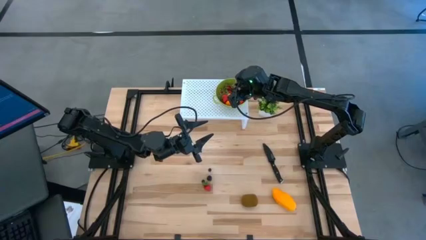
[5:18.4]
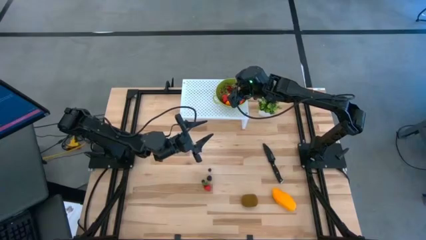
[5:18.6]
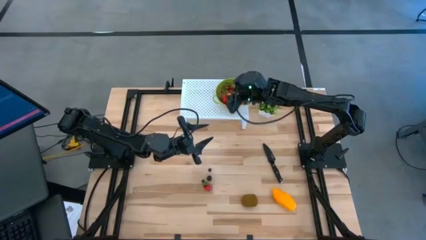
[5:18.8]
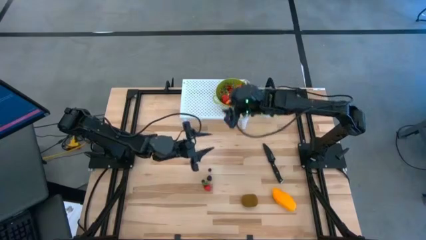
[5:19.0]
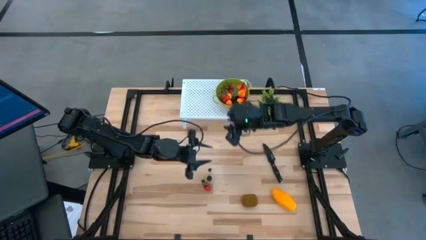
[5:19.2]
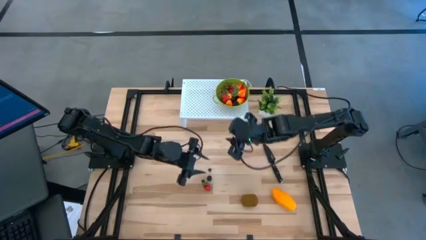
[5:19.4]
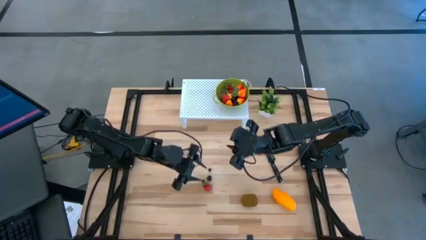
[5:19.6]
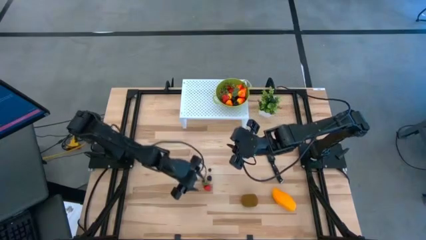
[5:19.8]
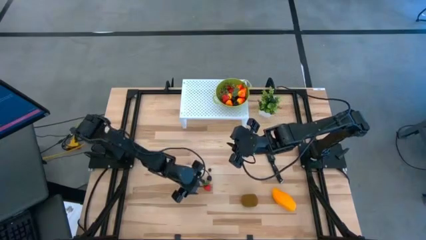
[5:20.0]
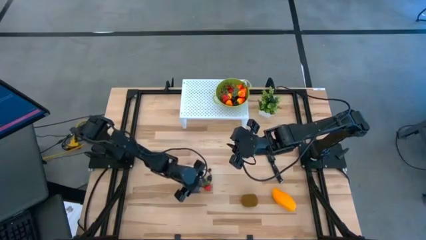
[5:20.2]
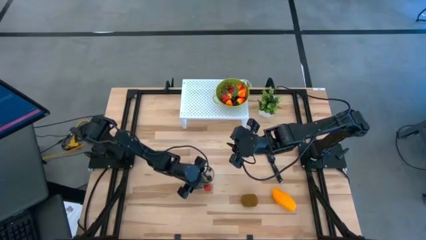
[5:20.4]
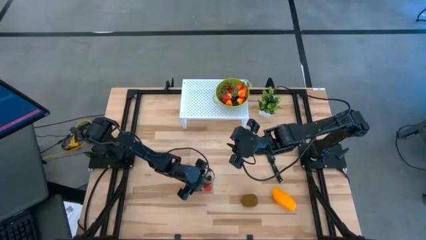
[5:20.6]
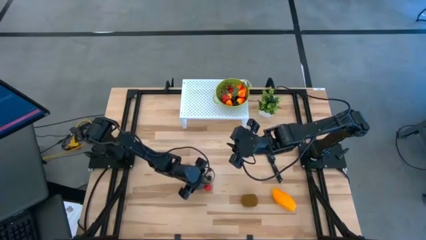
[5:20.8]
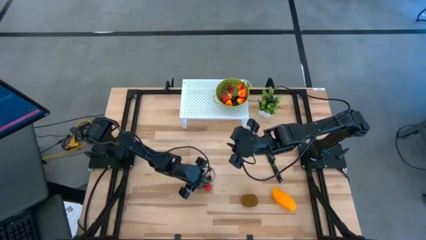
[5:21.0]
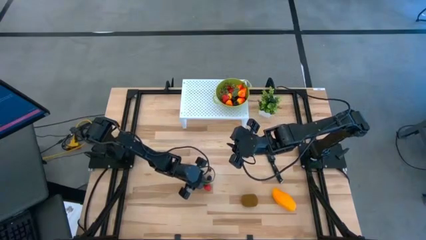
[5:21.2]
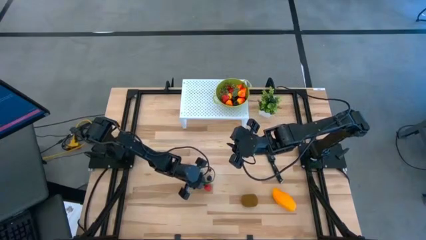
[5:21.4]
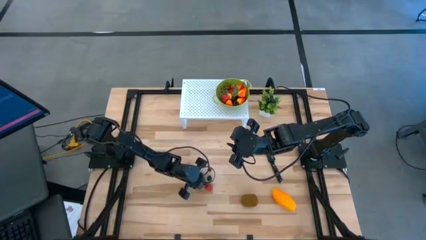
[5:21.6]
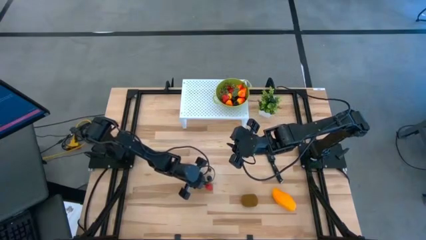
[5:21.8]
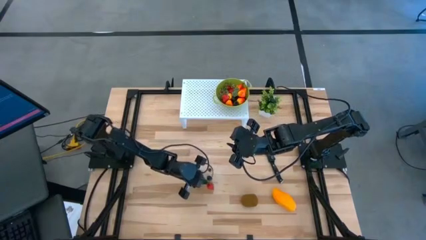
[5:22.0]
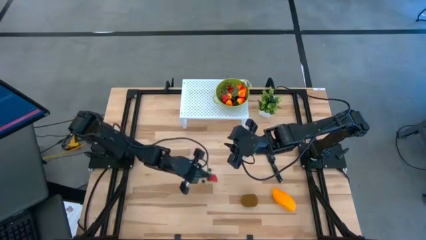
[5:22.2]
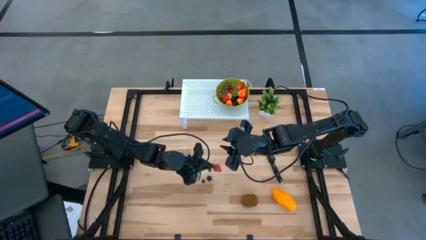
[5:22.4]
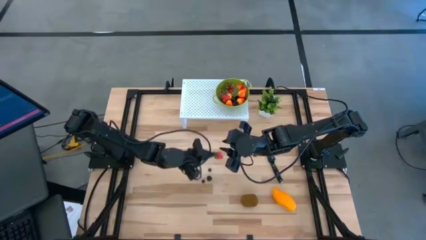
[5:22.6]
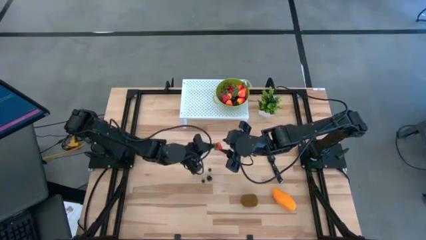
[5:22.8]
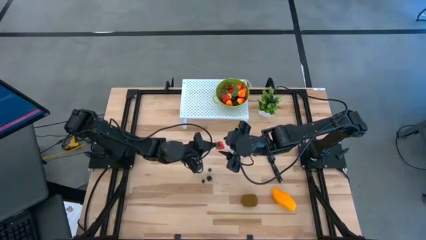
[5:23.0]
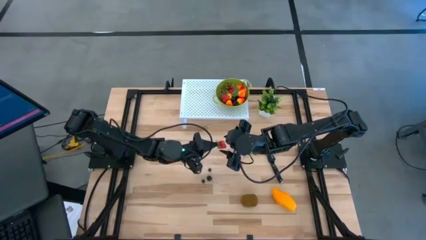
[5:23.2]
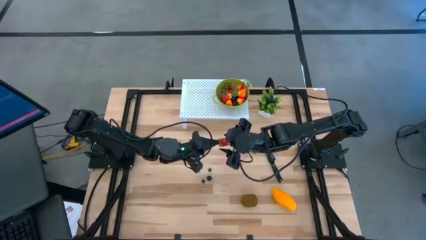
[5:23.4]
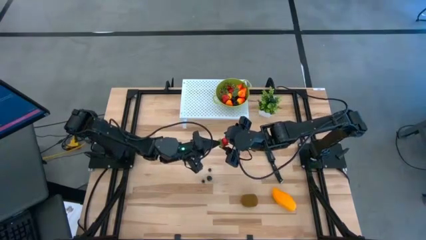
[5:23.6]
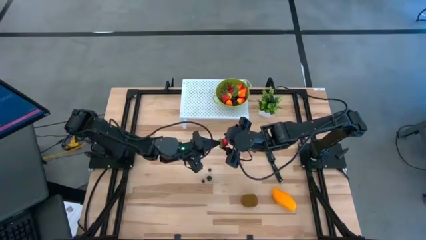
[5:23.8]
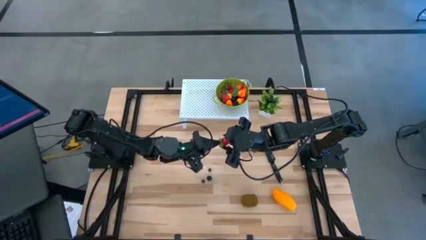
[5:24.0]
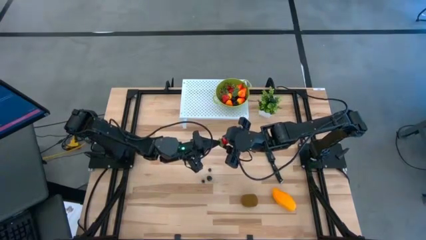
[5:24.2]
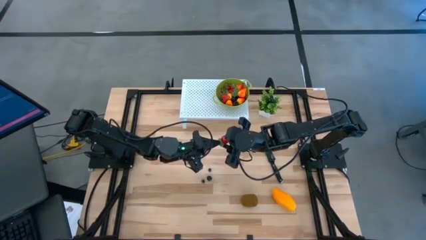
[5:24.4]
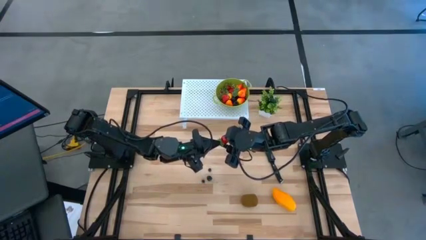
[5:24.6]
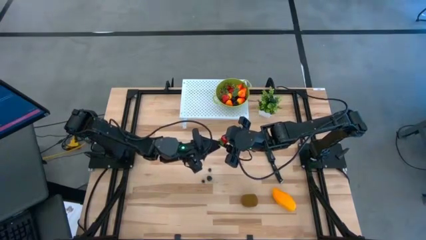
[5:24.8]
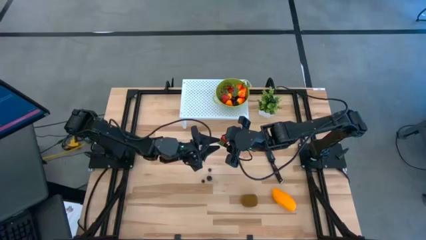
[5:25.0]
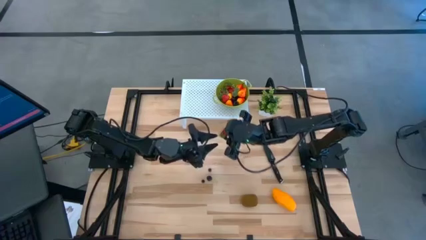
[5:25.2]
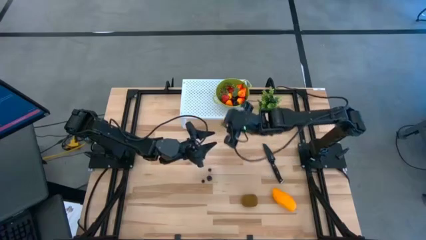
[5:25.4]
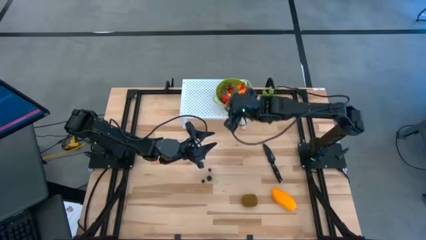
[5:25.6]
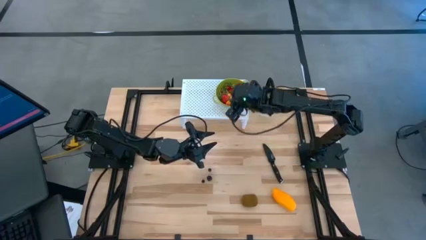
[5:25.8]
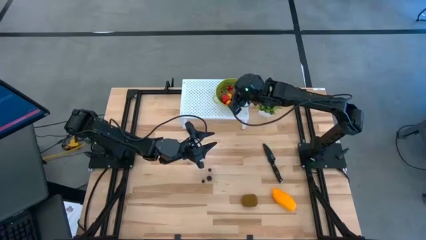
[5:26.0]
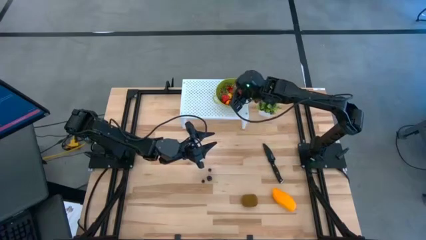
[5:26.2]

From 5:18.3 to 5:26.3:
Task: Pick & Place Fruit
Put the red strawberry into the green strainer bowl

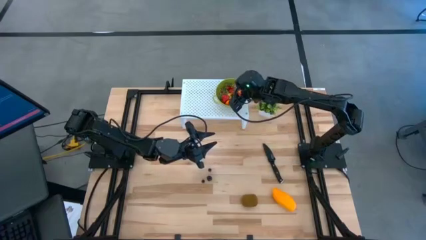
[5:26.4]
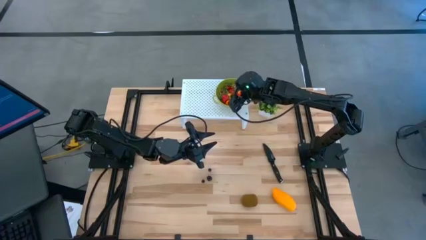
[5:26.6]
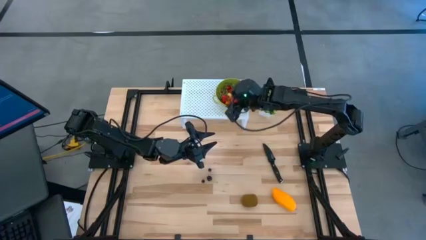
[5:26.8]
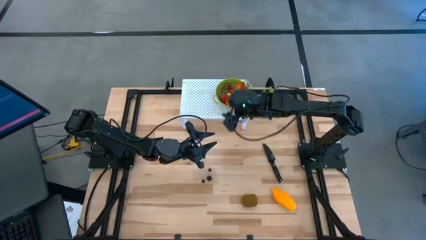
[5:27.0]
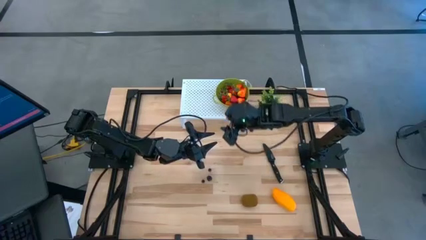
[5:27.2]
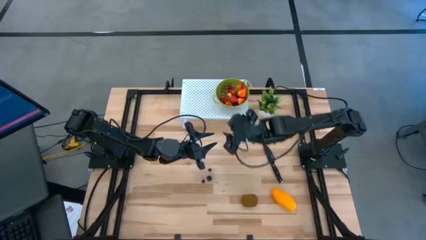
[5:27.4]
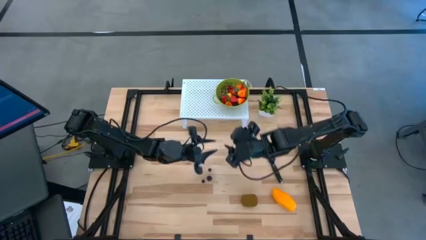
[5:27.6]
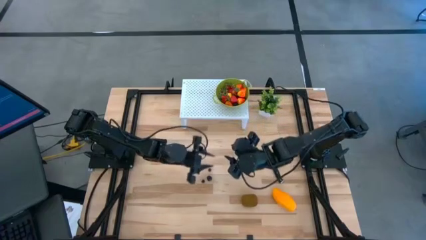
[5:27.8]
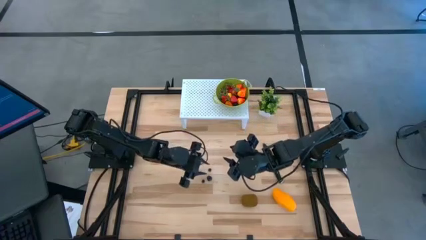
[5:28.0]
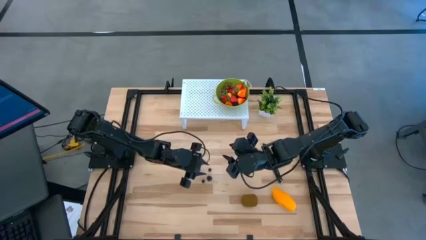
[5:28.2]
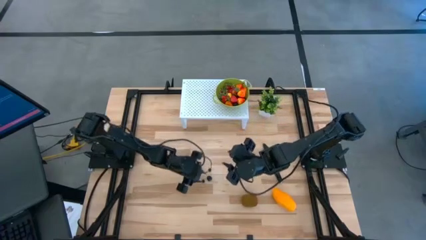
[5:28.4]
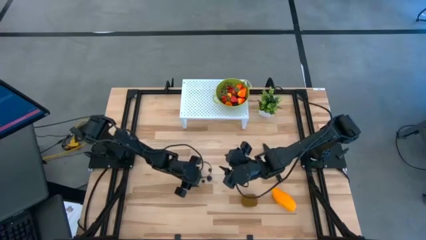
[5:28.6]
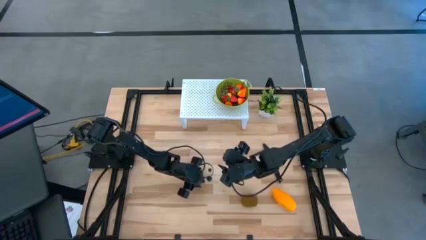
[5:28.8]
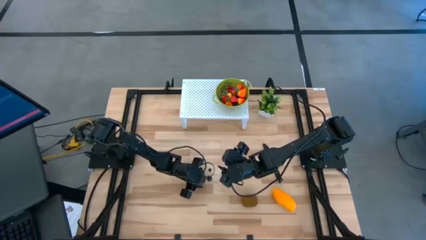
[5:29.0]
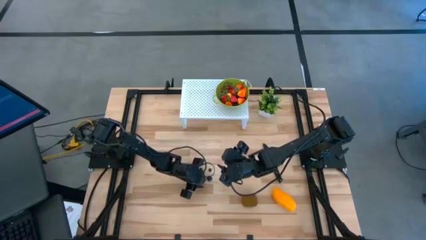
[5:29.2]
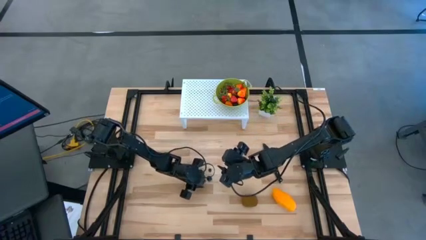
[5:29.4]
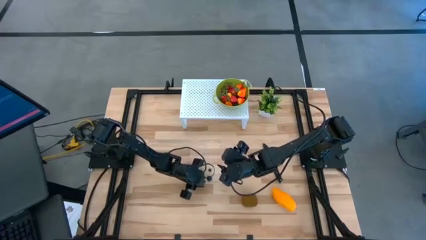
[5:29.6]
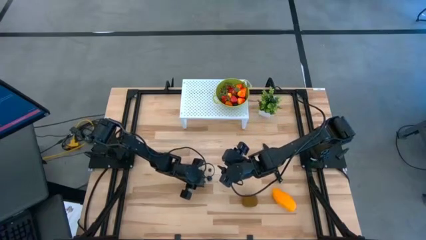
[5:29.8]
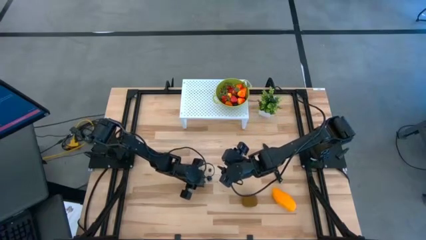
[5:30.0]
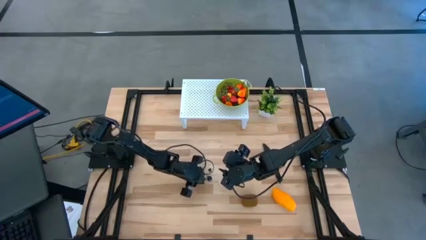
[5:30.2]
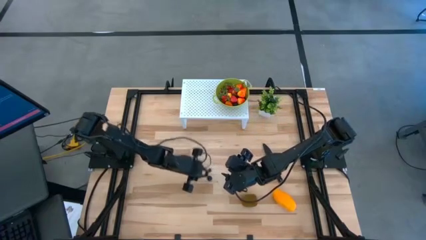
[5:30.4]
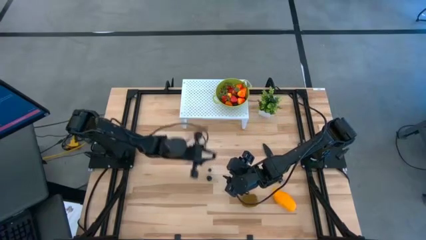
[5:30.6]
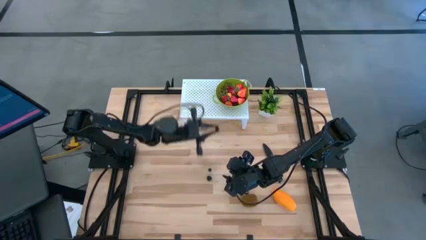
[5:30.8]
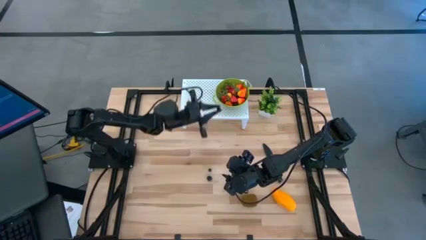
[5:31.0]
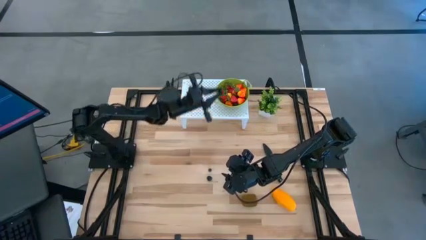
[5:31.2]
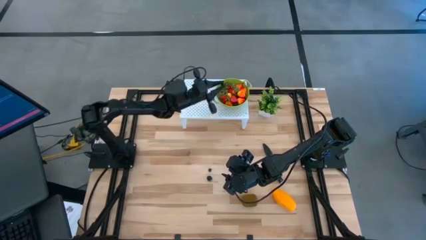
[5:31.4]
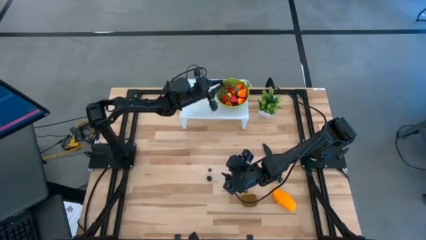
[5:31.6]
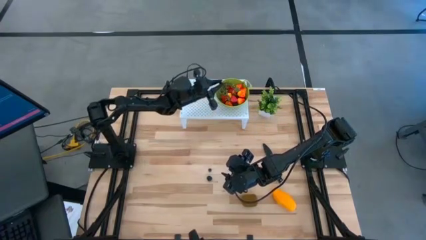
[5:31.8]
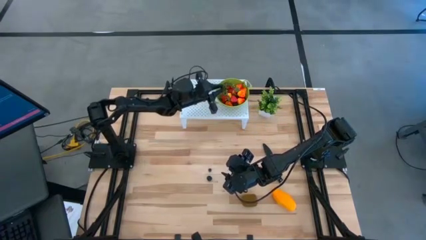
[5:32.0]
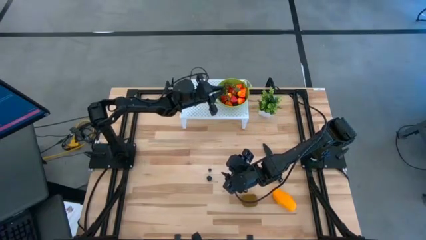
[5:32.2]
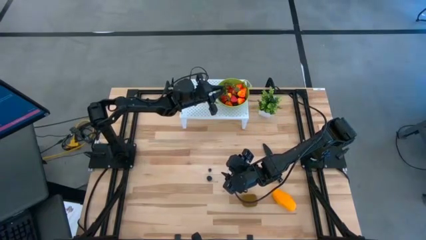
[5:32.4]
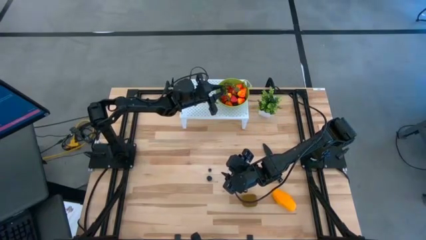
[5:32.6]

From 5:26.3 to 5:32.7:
Put the black blueberry into the green strainer bowl
